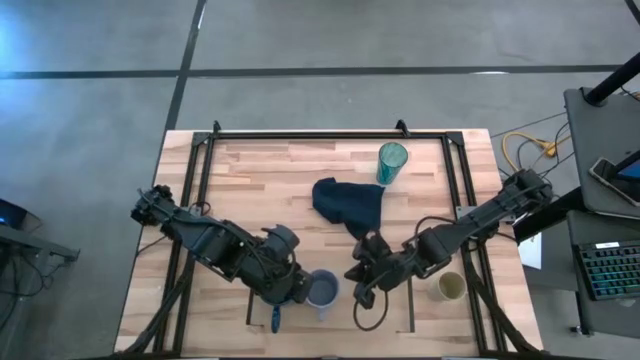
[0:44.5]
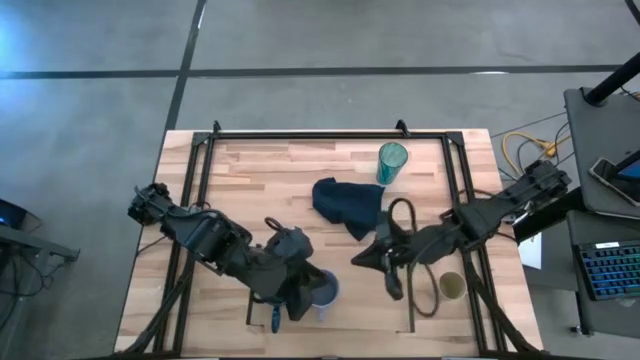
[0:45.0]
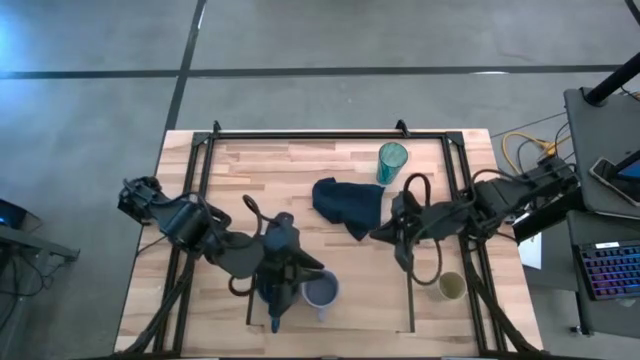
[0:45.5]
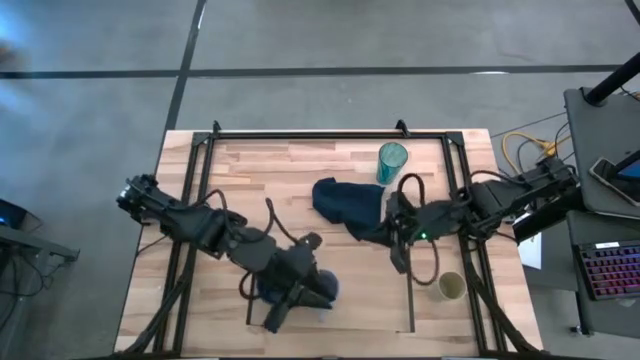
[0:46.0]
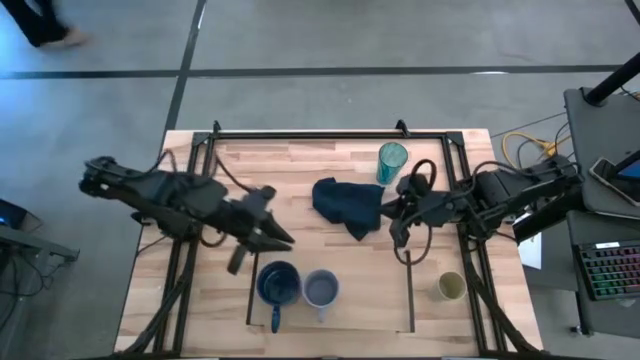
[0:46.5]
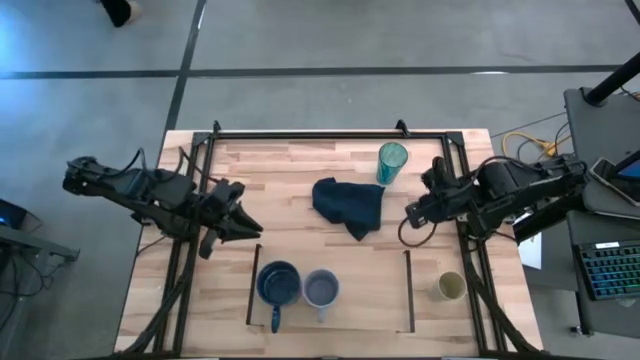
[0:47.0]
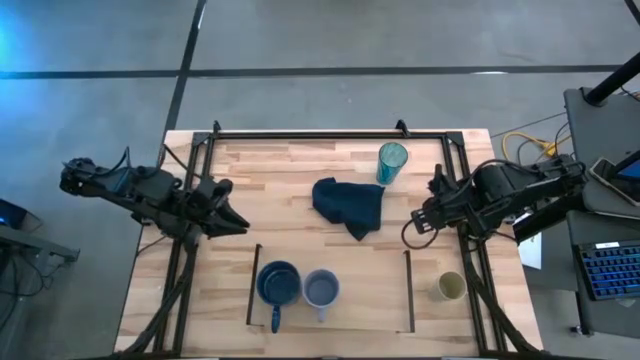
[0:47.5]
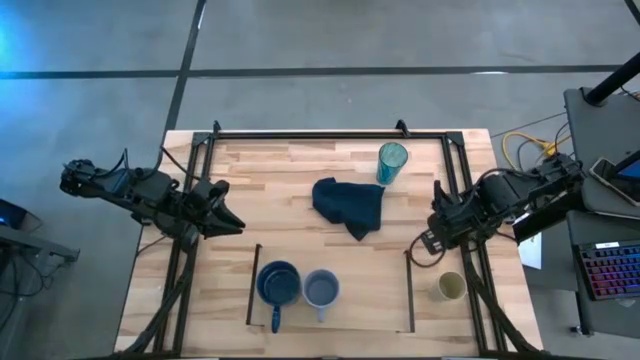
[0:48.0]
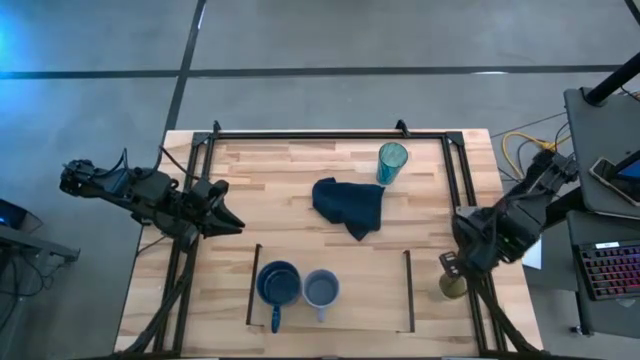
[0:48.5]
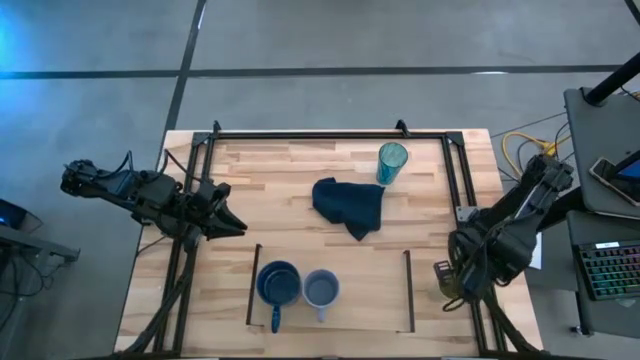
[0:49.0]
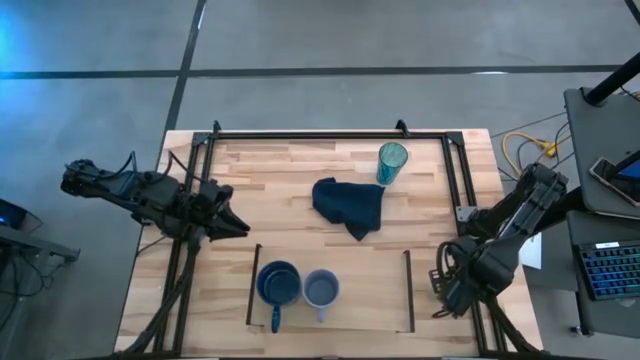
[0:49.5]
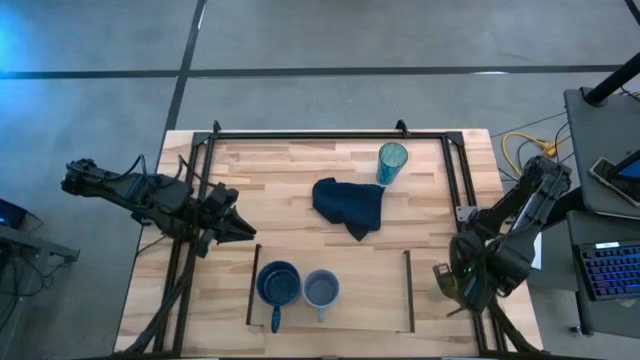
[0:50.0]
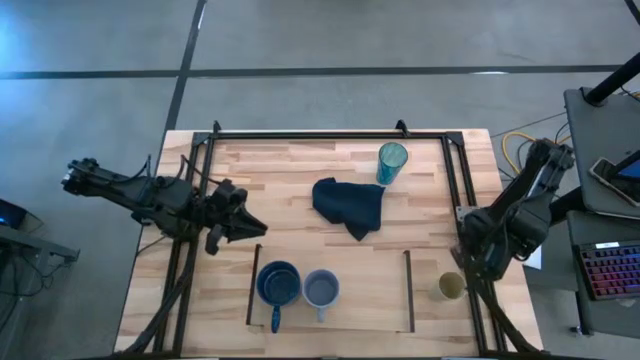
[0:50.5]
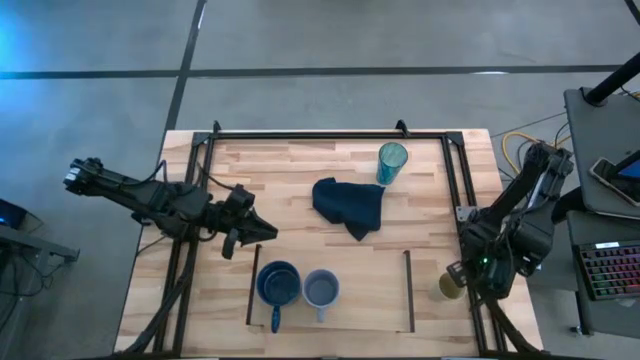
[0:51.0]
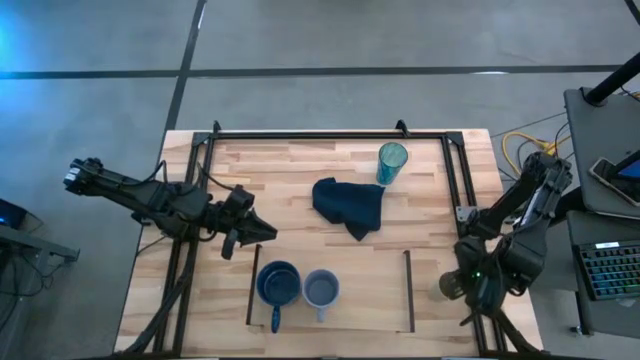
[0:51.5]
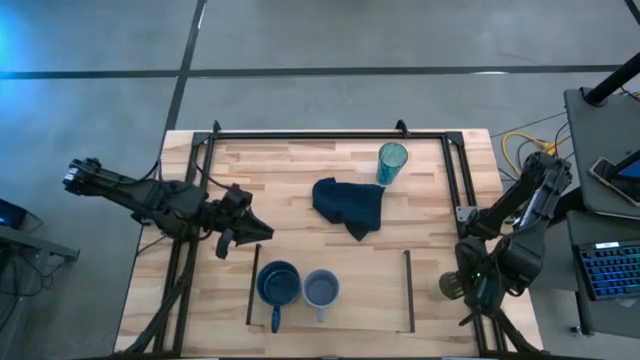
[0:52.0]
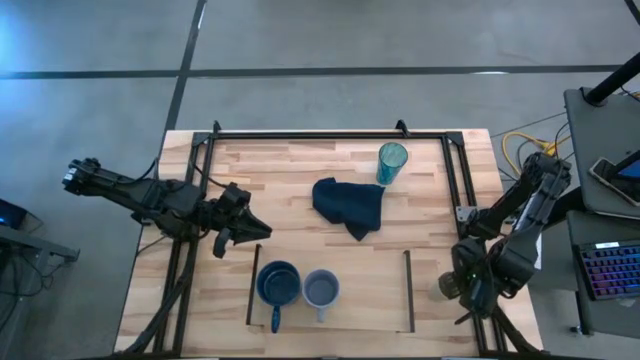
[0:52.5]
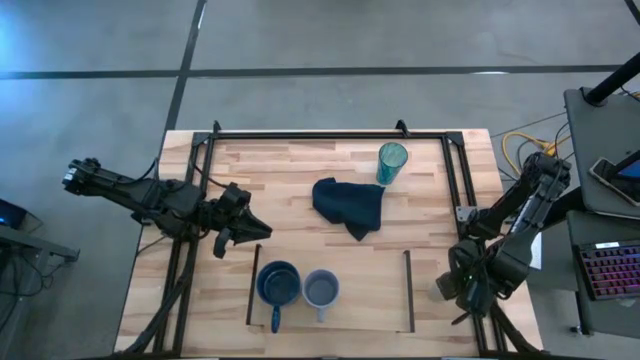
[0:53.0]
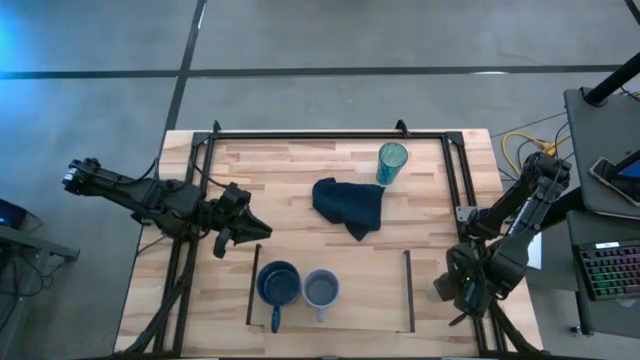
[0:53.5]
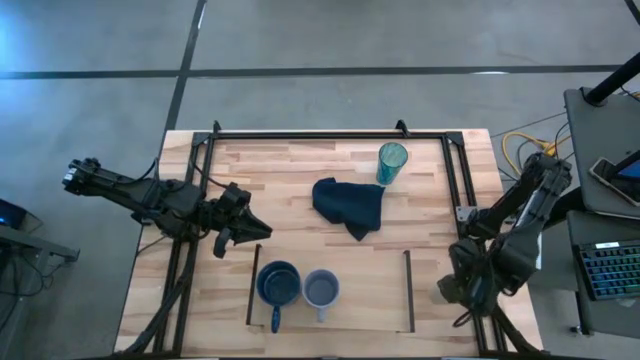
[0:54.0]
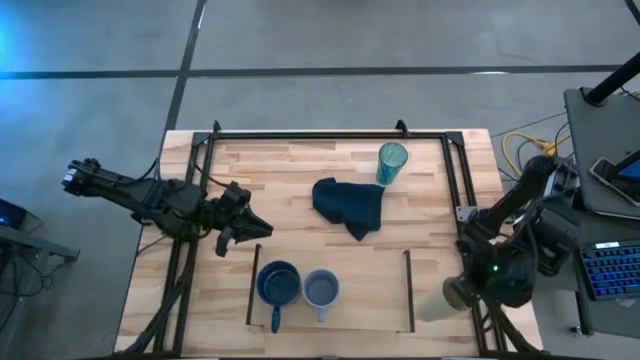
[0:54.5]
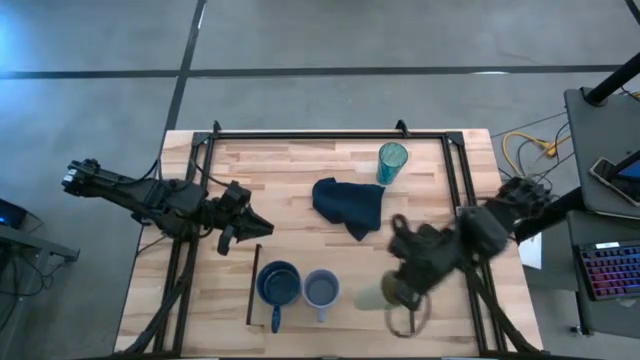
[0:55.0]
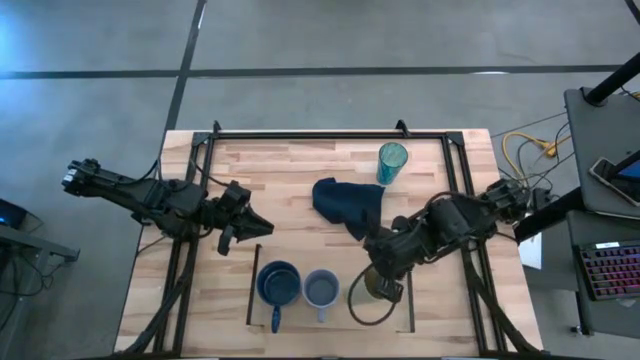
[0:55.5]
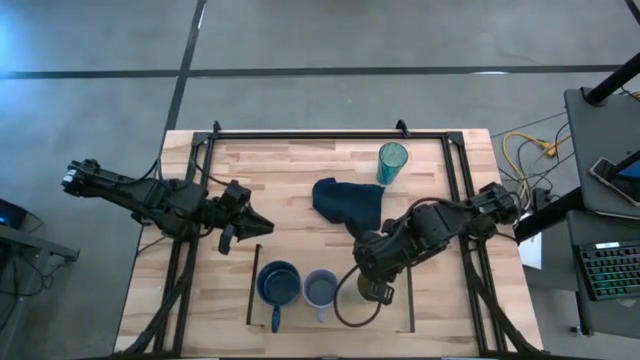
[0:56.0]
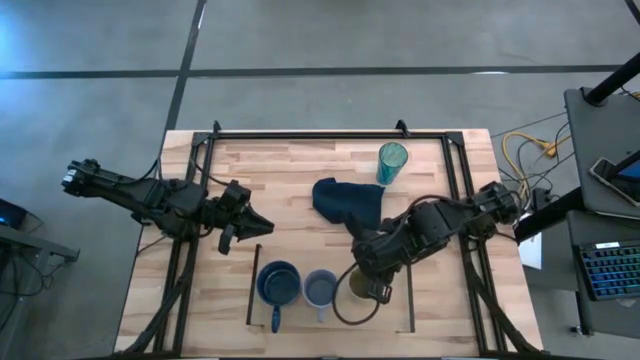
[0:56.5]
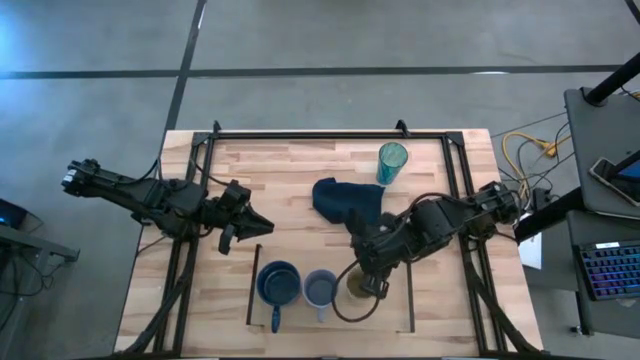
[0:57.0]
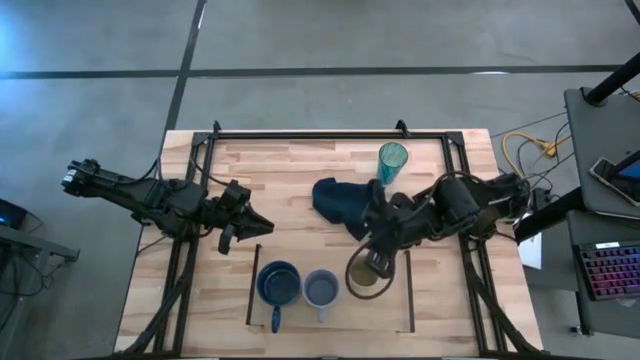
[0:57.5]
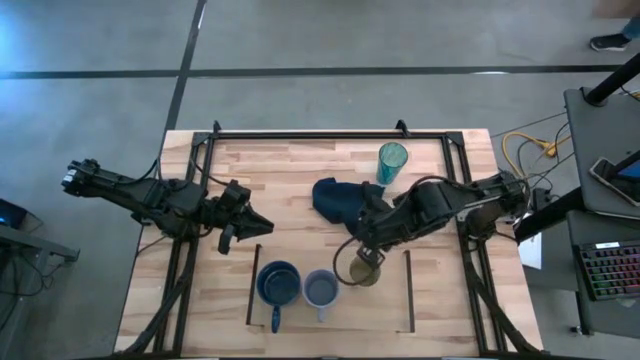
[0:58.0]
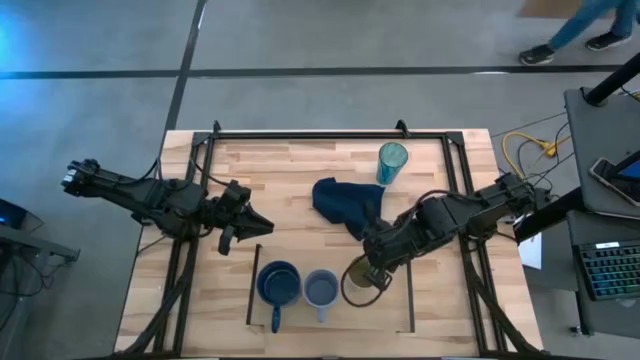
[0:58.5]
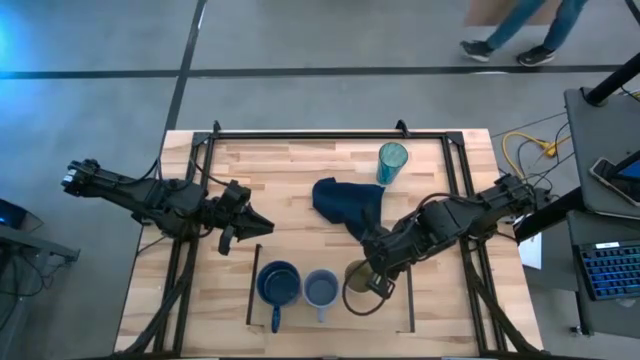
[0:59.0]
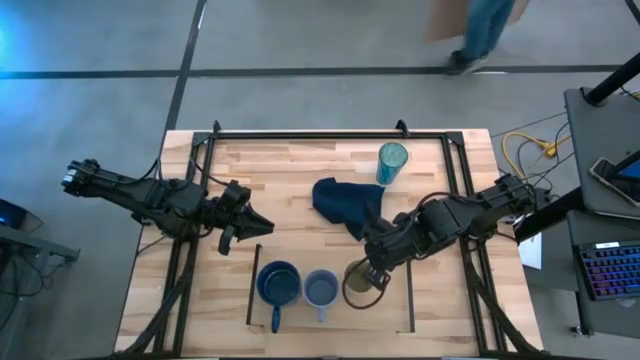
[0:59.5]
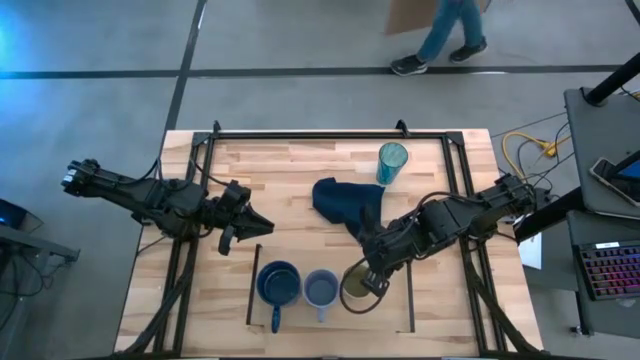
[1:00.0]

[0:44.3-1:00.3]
Task: Stack small to large cups/mugs on shelf
Put the white cup on the shelf

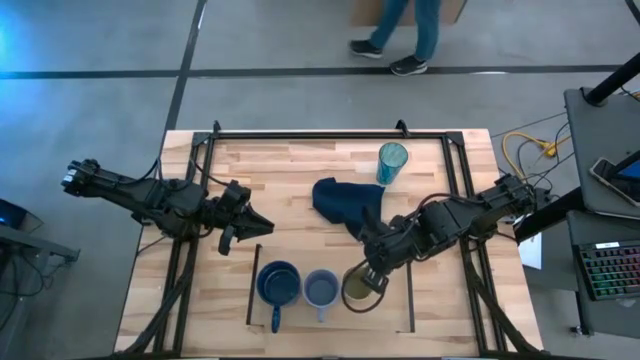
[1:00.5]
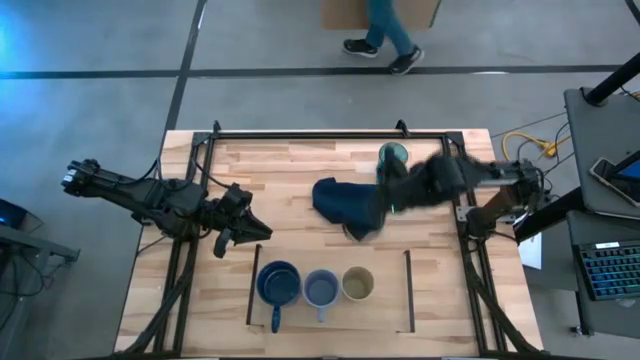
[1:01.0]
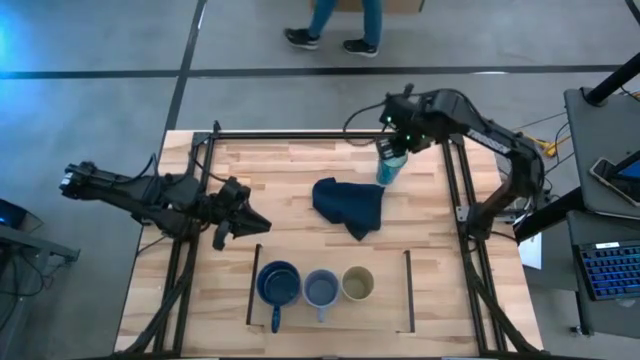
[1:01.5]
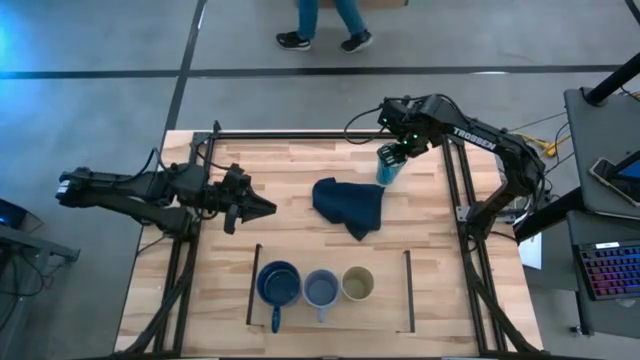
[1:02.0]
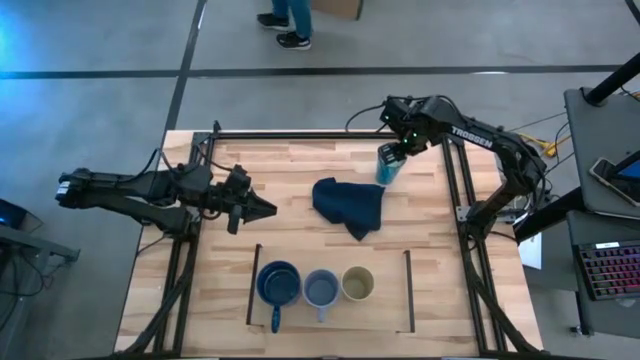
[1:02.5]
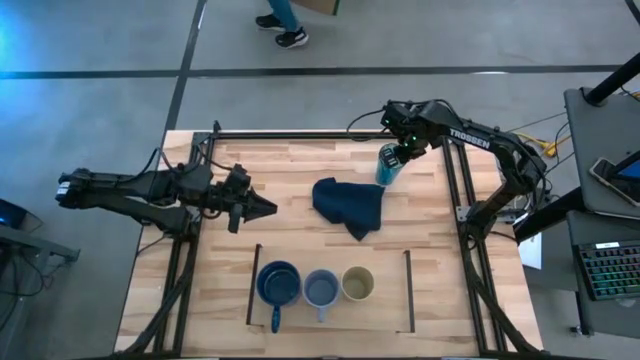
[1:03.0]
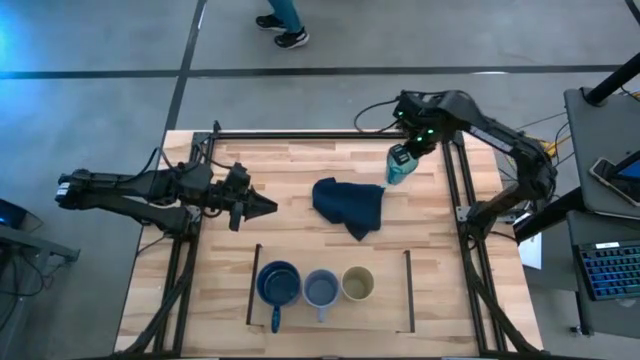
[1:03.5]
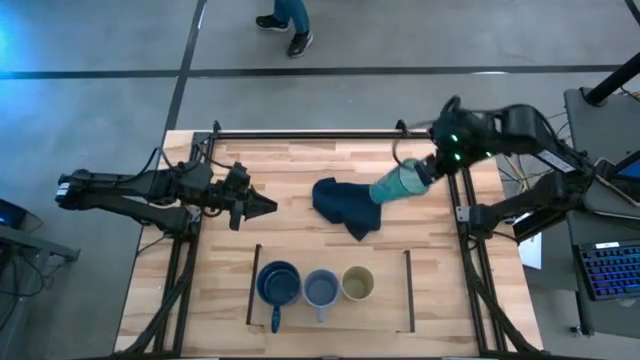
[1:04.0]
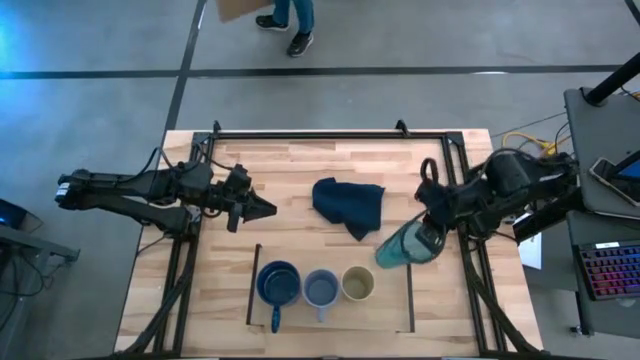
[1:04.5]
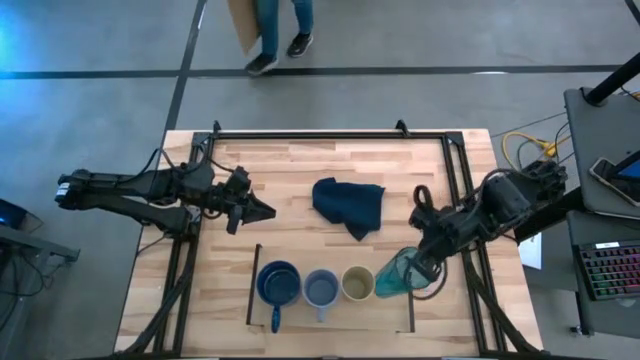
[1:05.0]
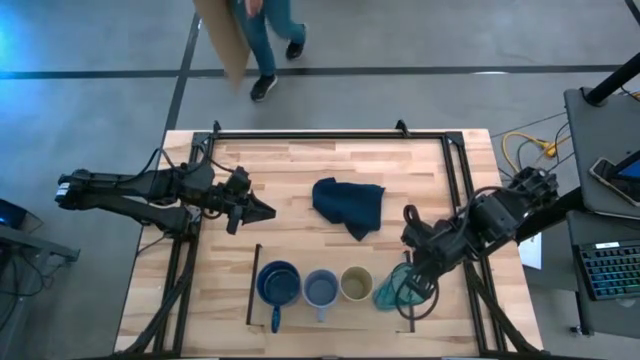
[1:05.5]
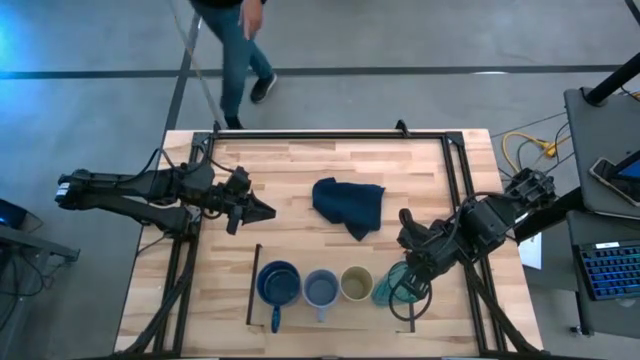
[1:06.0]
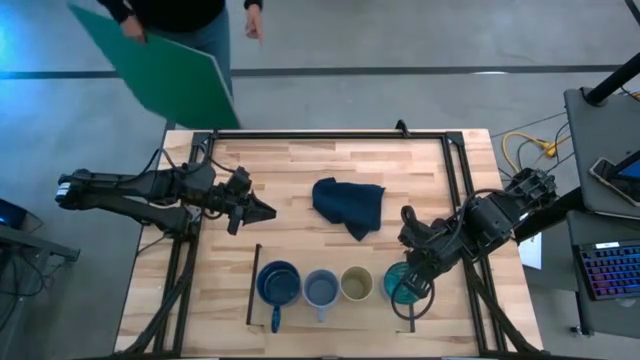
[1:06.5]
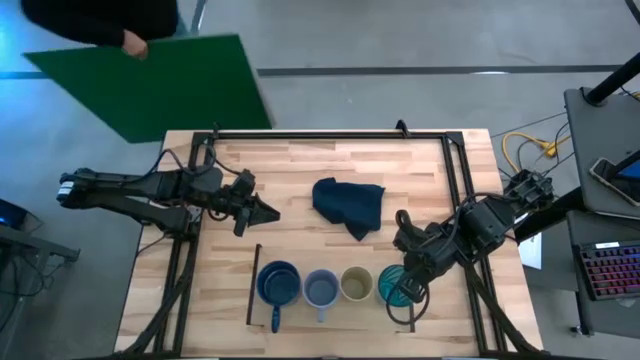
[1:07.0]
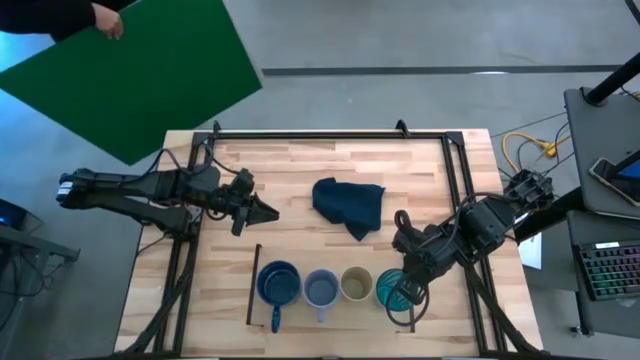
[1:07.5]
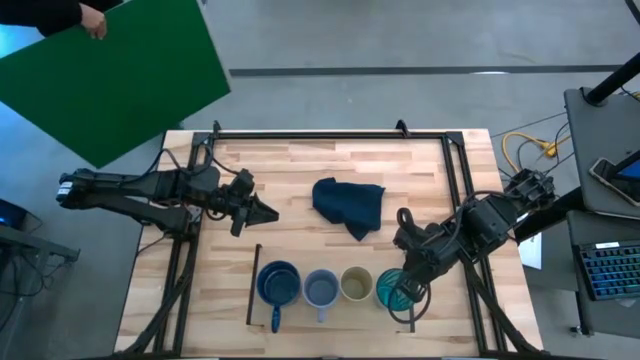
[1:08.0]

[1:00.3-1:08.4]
Put the blue cup on the shelf
